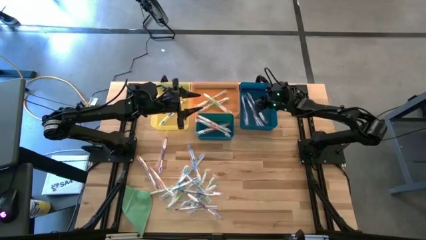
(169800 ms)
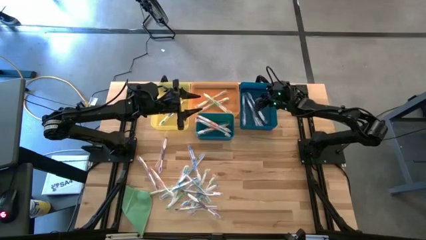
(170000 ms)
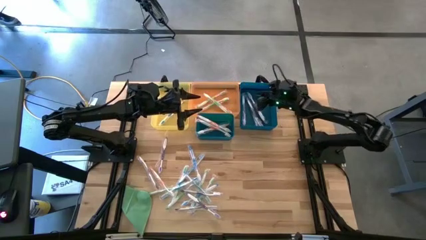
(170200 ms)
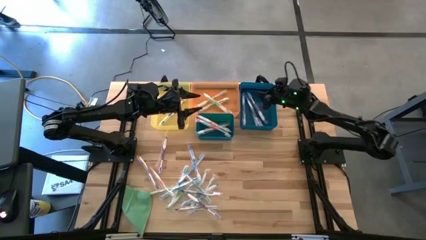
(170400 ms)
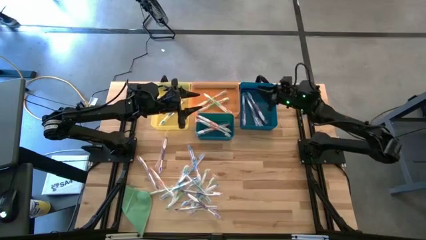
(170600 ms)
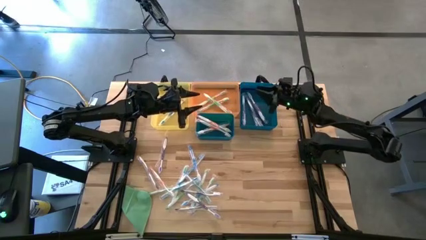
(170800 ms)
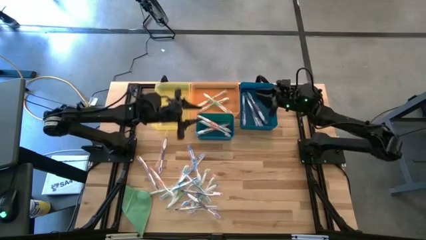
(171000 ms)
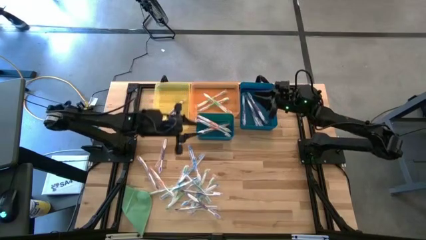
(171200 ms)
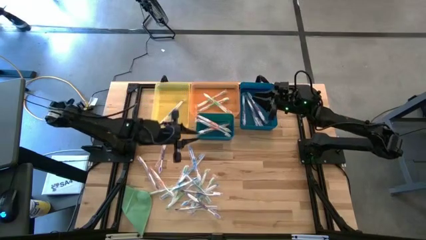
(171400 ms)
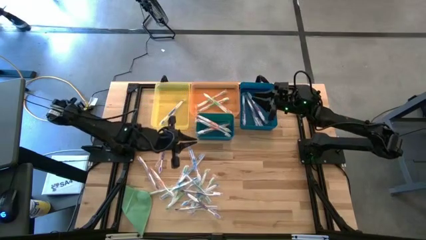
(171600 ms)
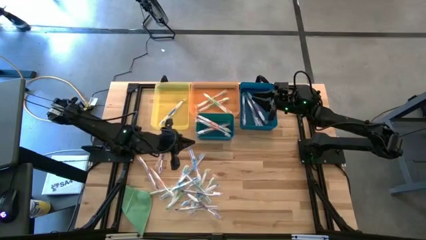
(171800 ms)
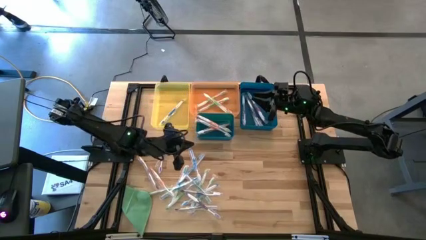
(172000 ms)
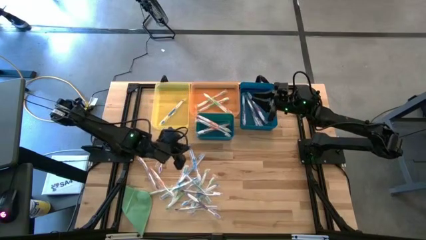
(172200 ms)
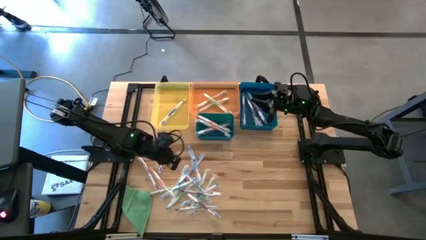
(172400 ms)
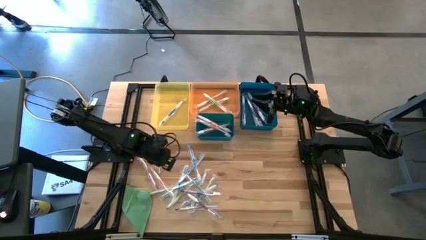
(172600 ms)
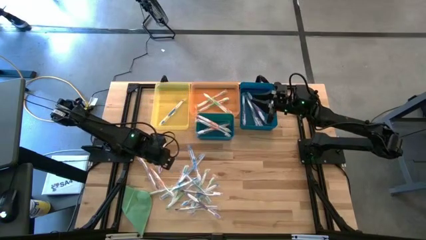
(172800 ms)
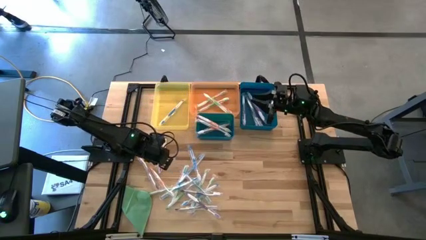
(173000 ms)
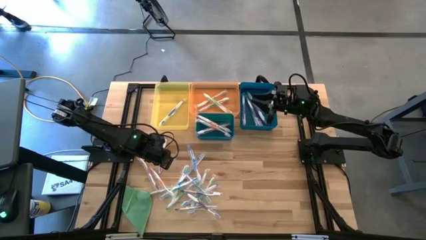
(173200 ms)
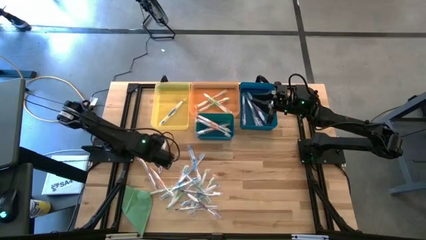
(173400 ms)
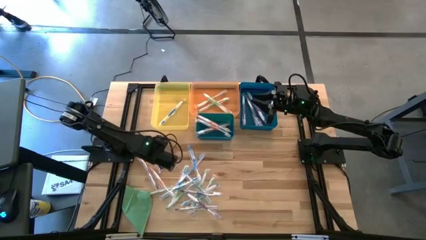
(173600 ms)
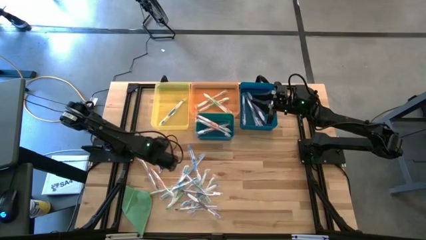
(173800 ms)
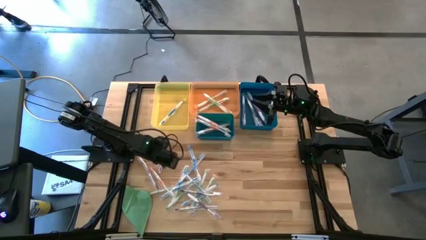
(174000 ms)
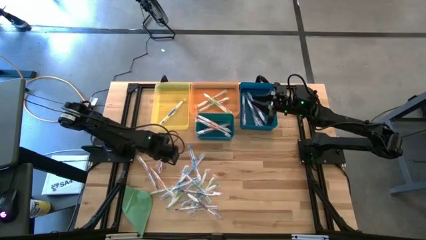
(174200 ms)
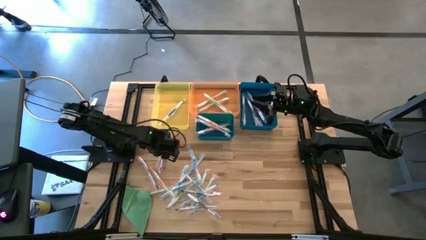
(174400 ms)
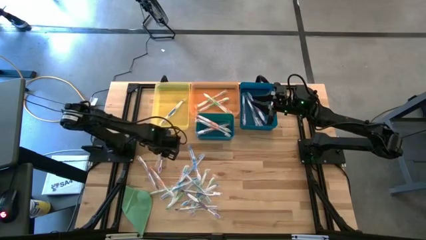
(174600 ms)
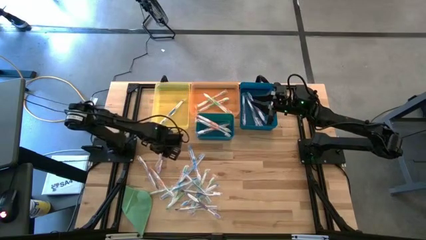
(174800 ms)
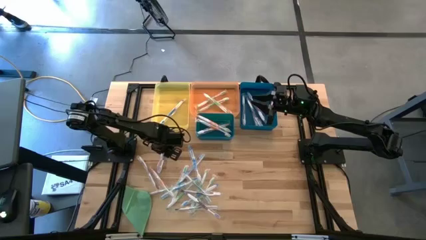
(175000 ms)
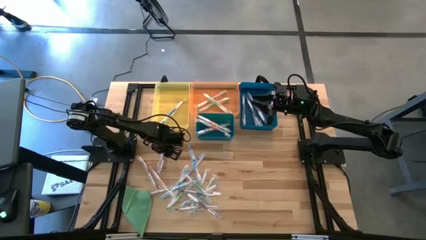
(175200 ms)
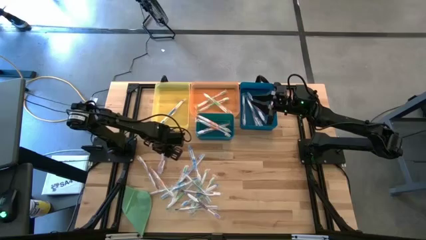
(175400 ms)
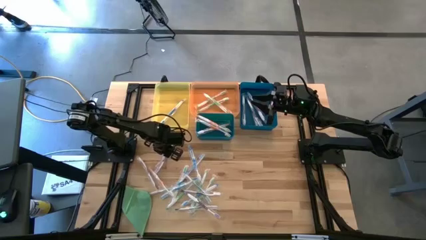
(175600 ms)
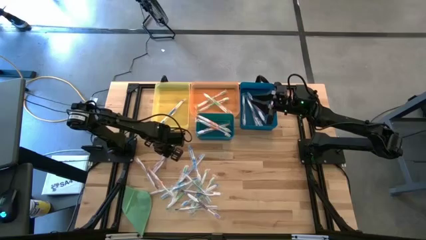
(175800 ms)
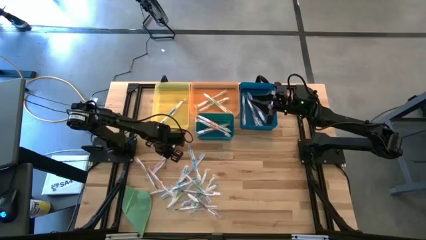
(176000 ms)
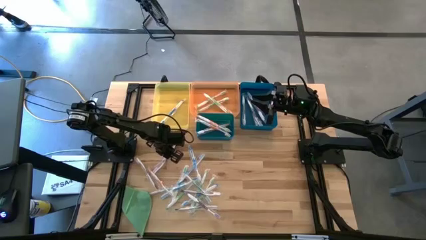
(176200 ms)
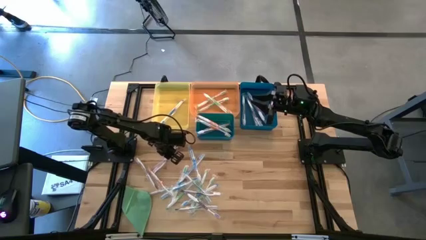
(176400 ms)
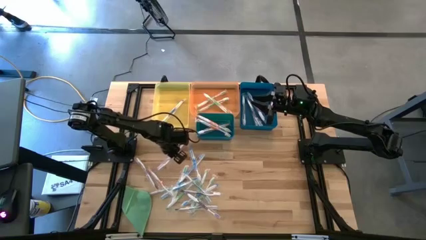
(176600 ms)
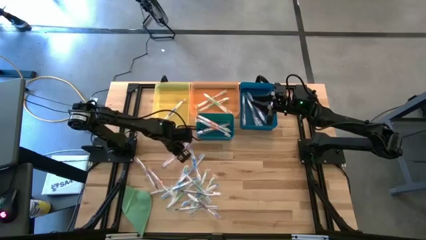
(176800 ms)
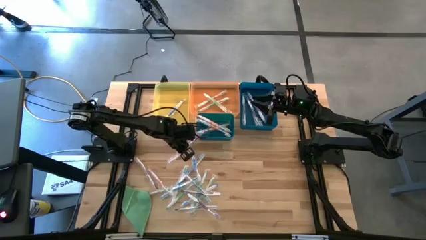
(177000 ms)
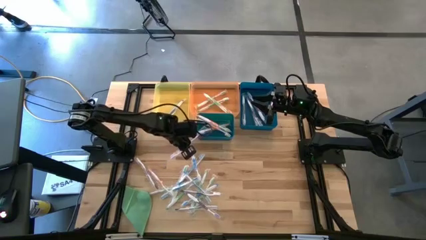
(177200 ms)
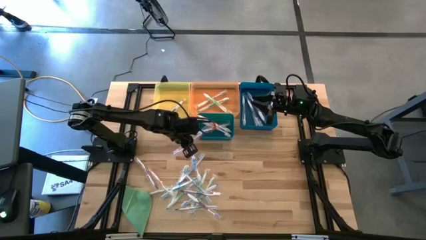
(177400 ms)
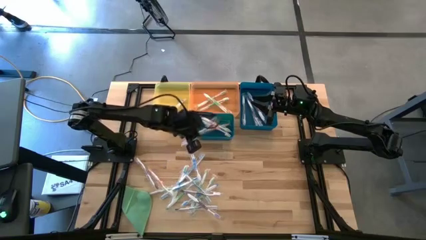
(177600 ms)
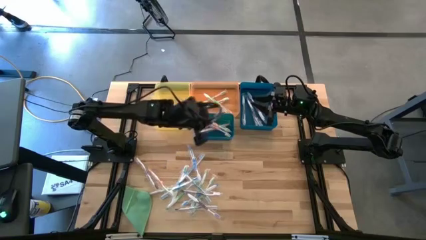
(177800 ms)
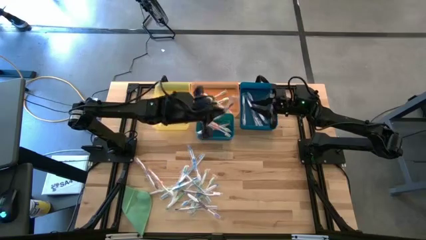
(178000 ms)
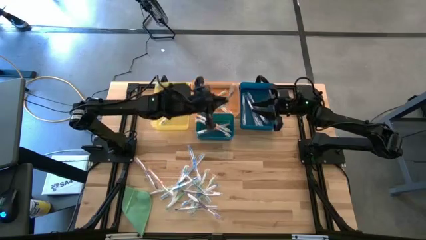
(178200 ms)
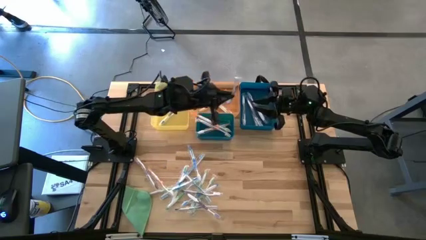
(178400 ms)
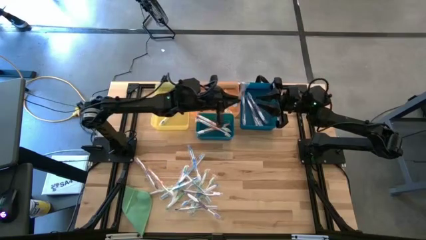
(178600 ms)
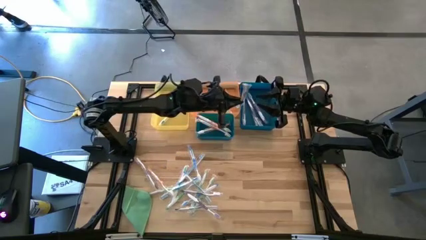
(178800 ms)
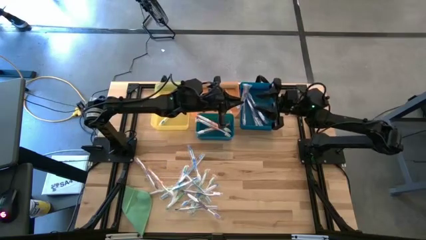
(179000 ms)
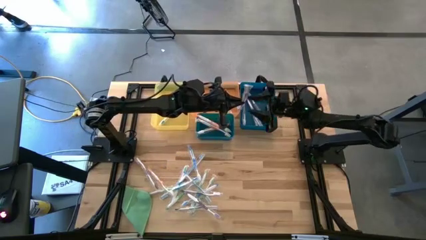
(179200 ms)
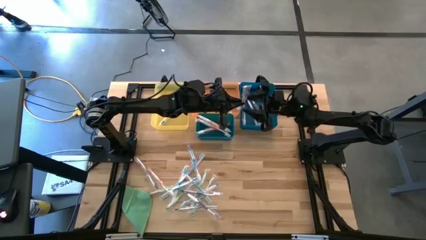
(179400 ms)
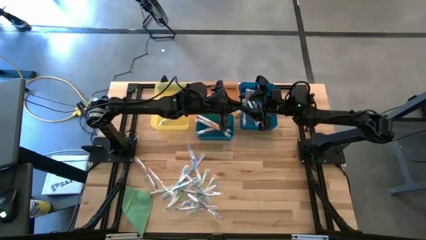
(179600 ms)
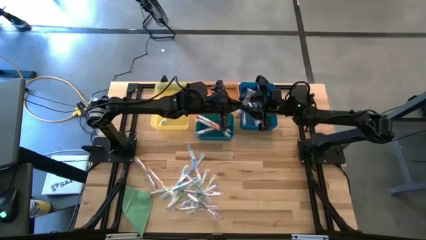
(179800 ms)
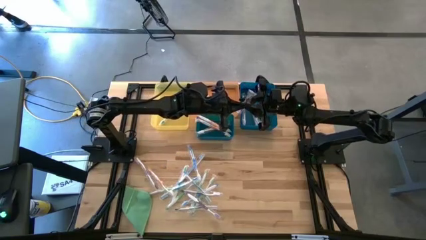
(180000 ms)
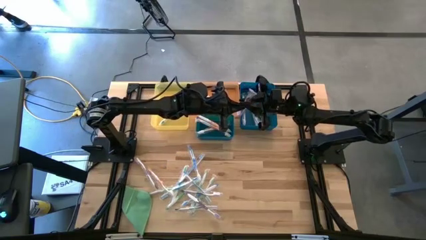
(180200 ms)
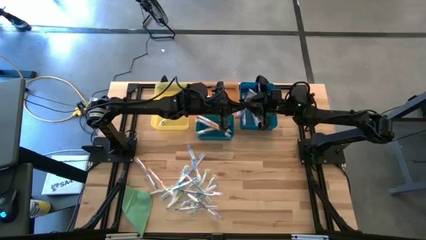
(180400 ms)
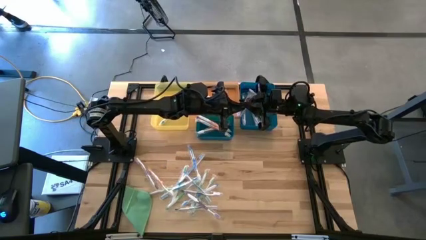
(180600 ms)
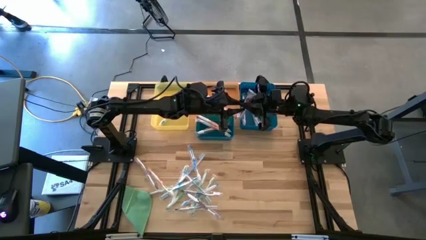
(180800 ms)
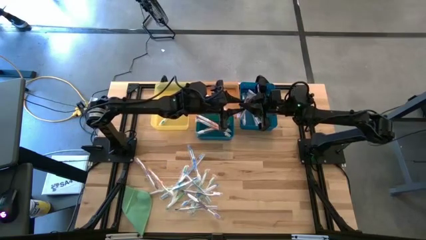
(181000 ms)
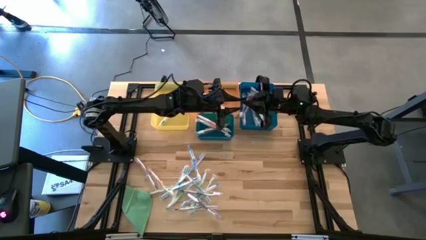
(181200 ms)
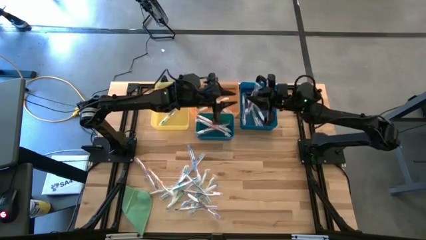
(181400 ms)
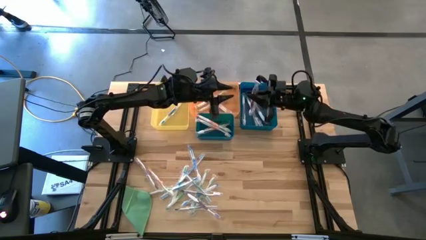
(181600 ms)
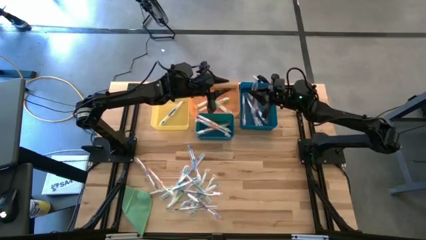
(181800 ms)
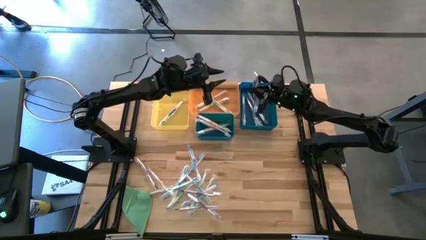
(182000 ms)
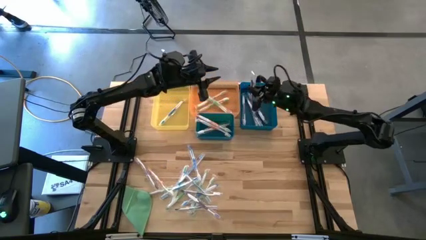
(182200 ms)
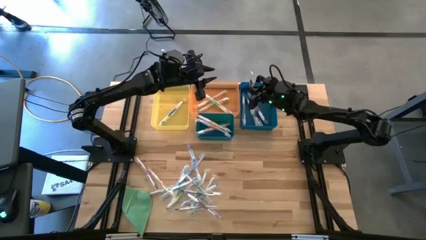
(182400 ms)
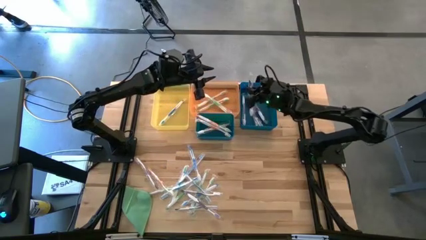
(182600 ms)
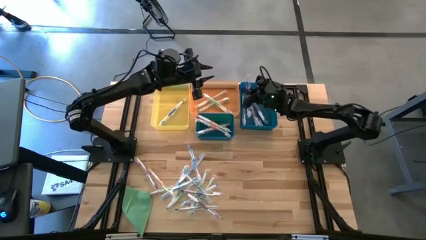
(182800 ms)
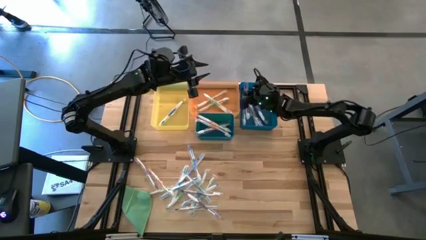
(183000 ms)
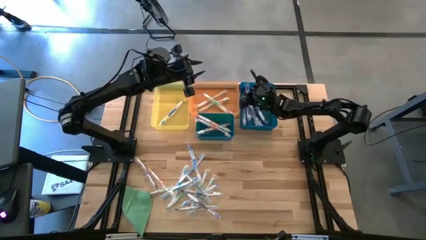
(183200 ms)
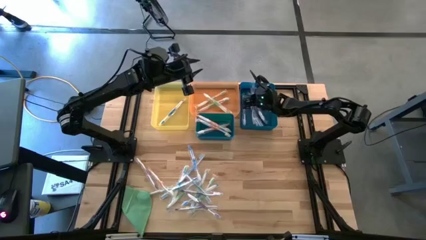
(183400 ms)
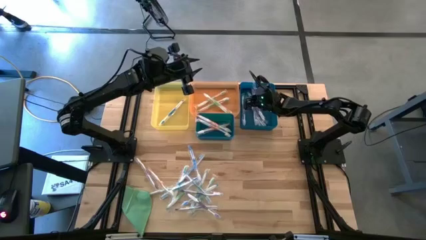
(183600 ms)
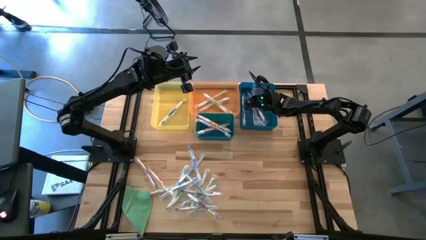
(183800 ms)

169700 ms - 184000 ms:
Task: Pick & Place Toothbrushes
Put the purple toothbrush into the blue bin
